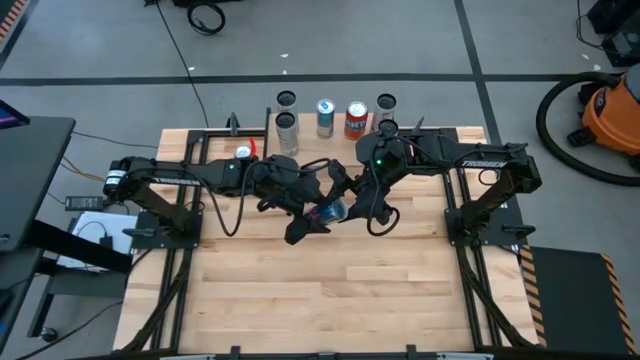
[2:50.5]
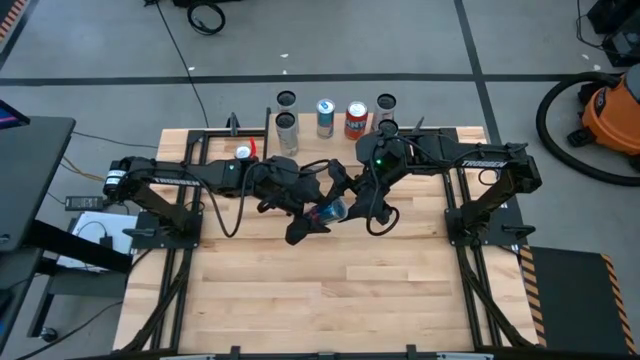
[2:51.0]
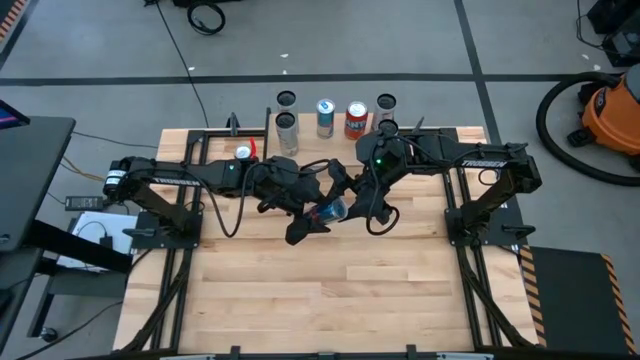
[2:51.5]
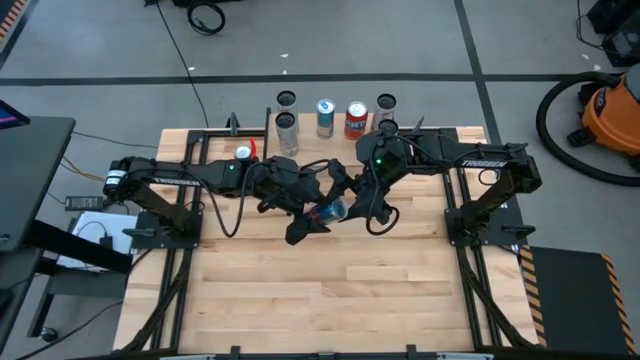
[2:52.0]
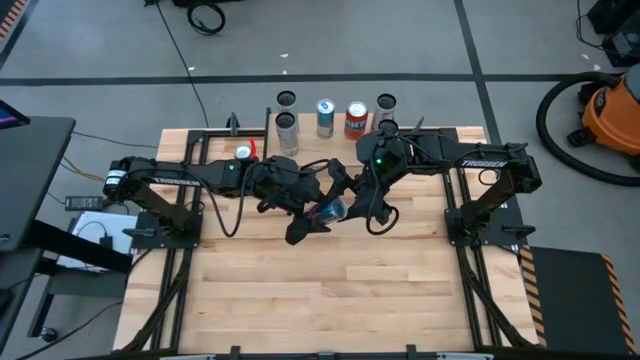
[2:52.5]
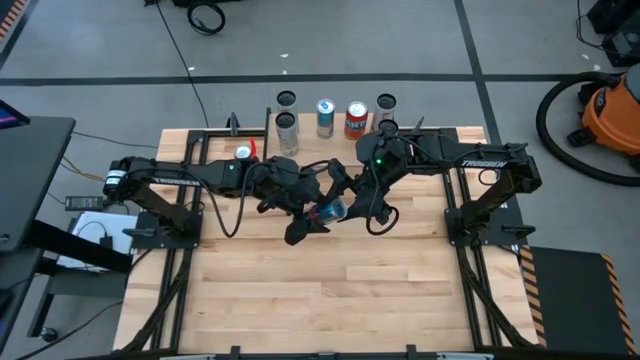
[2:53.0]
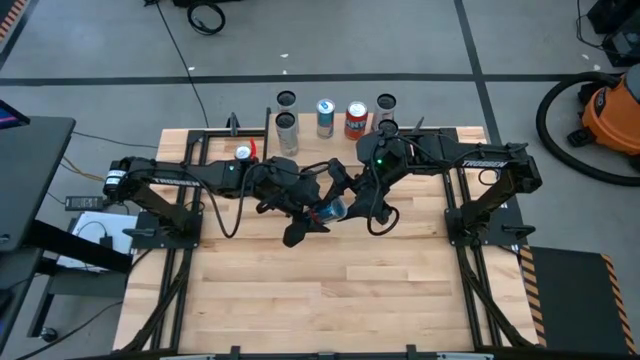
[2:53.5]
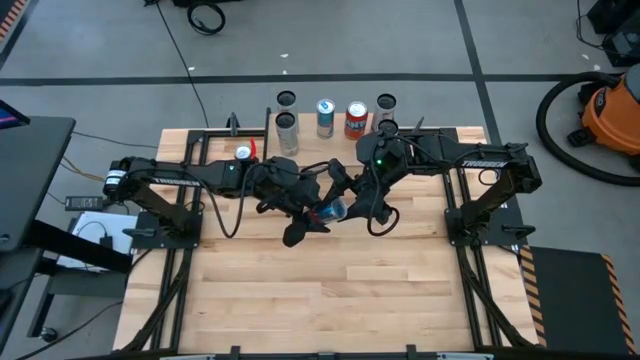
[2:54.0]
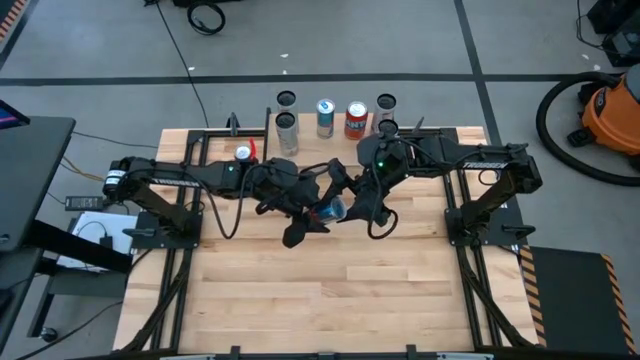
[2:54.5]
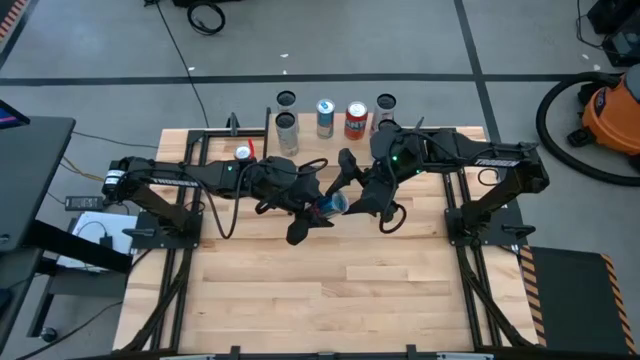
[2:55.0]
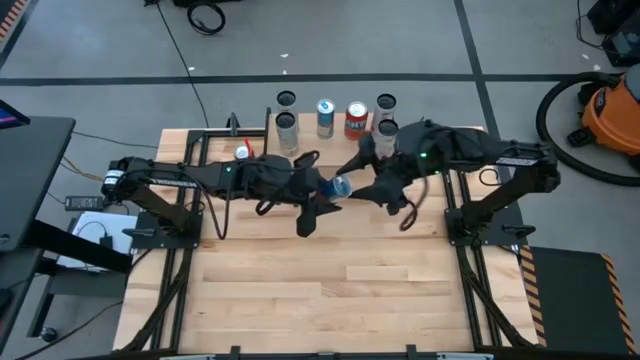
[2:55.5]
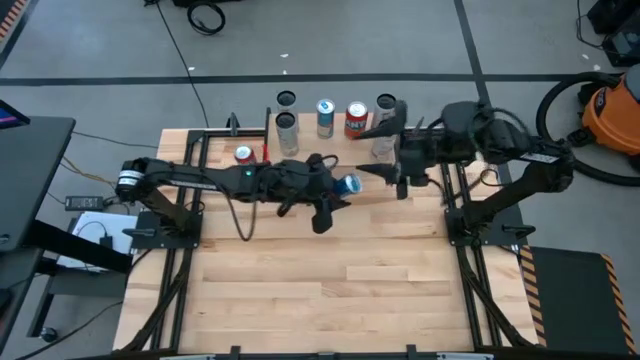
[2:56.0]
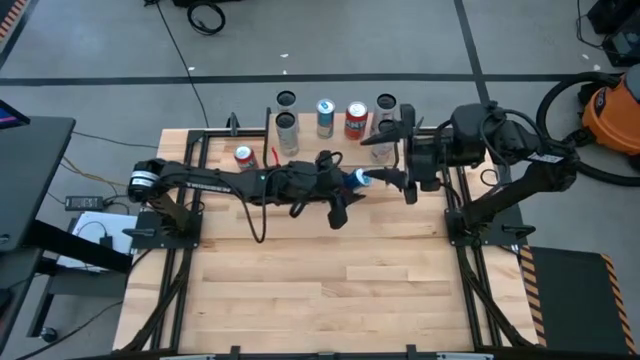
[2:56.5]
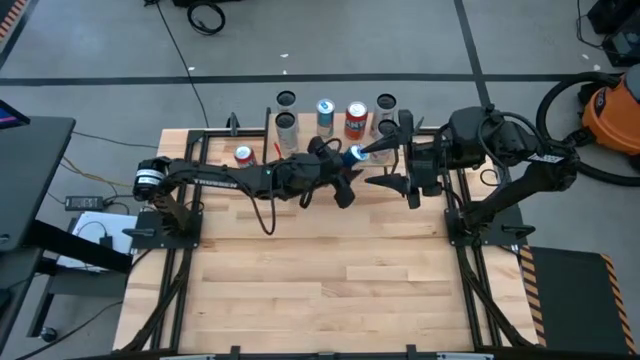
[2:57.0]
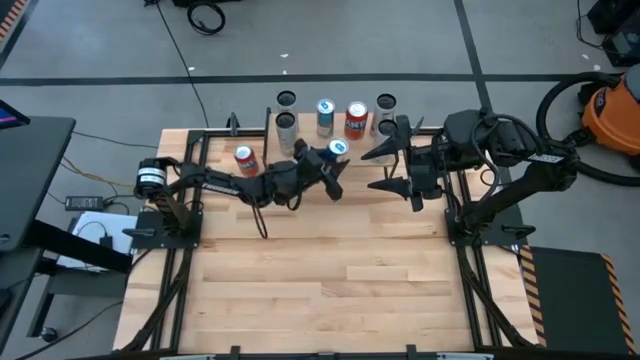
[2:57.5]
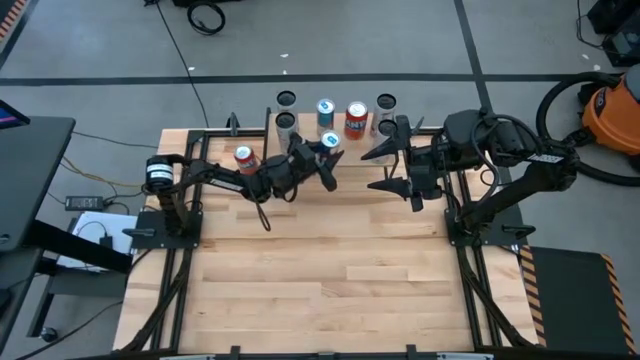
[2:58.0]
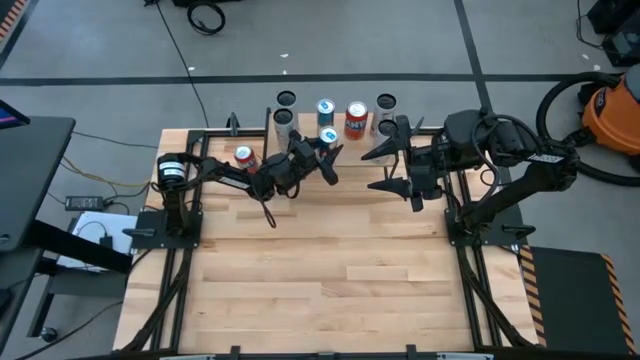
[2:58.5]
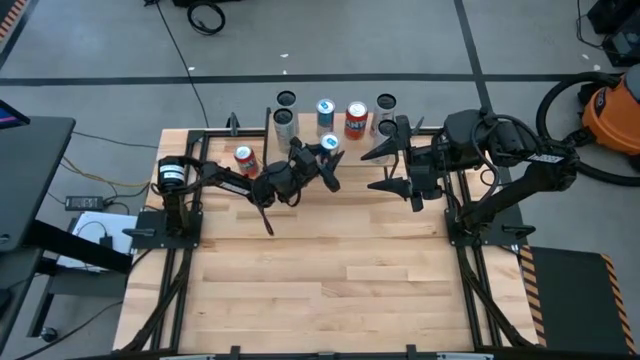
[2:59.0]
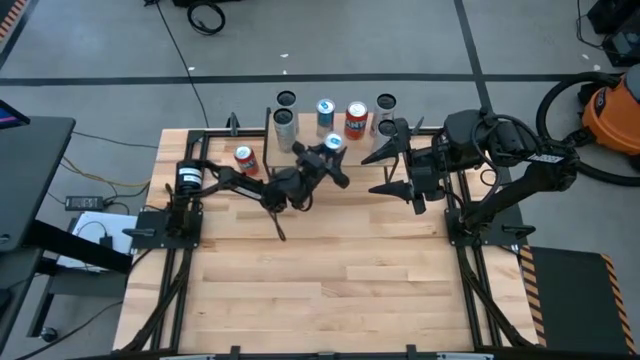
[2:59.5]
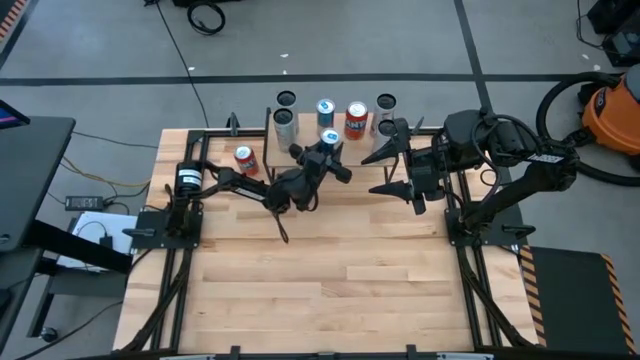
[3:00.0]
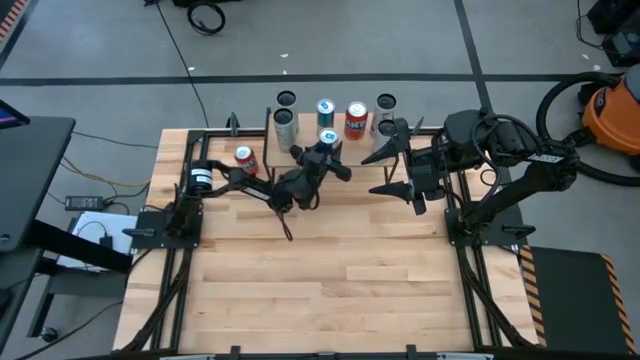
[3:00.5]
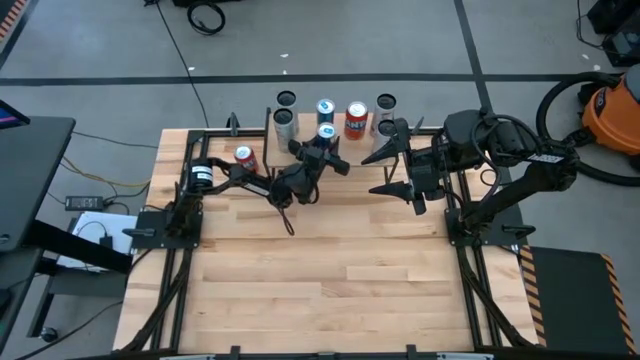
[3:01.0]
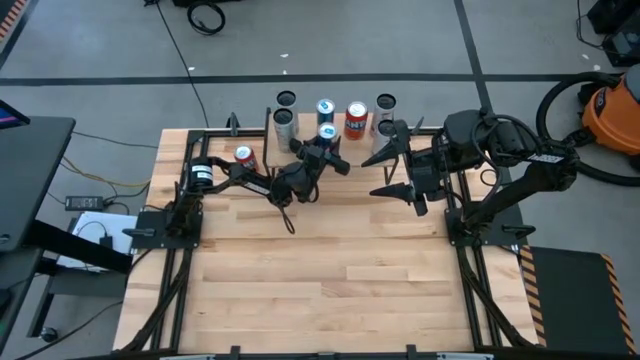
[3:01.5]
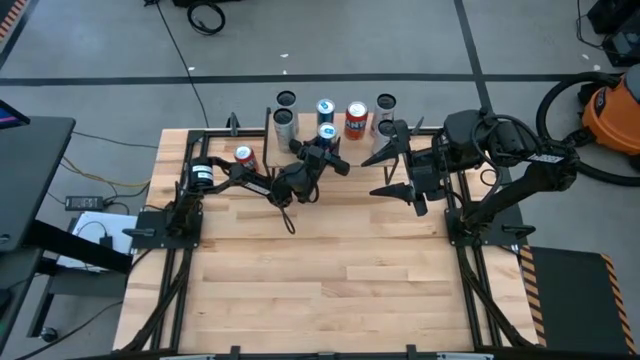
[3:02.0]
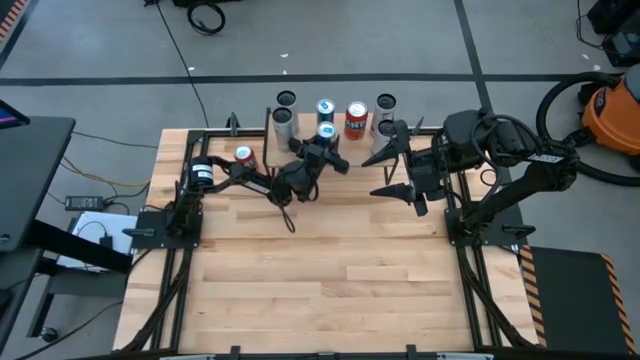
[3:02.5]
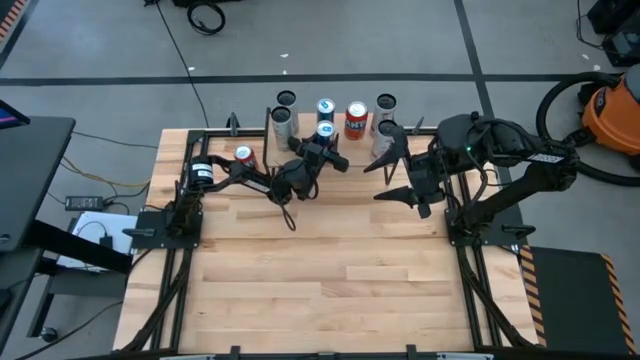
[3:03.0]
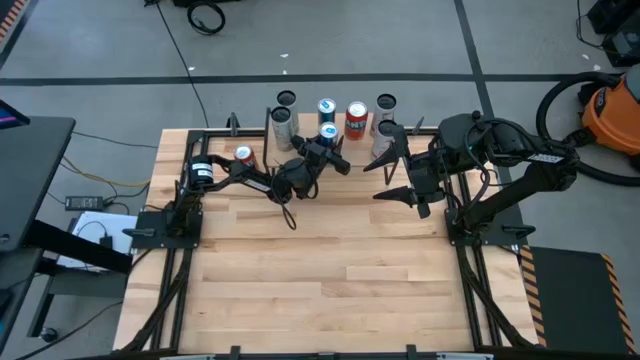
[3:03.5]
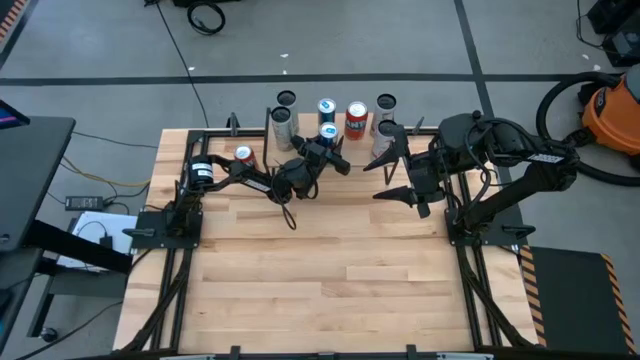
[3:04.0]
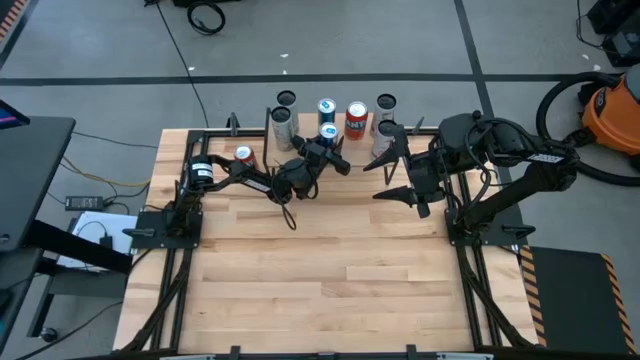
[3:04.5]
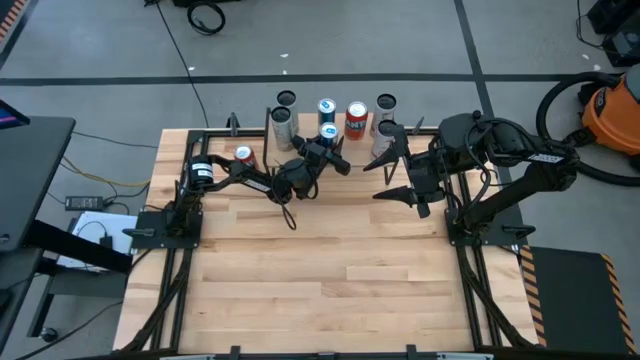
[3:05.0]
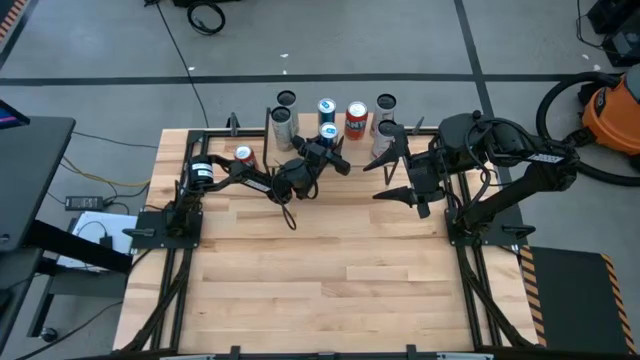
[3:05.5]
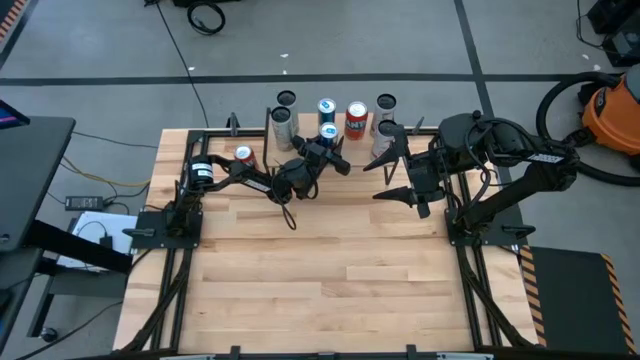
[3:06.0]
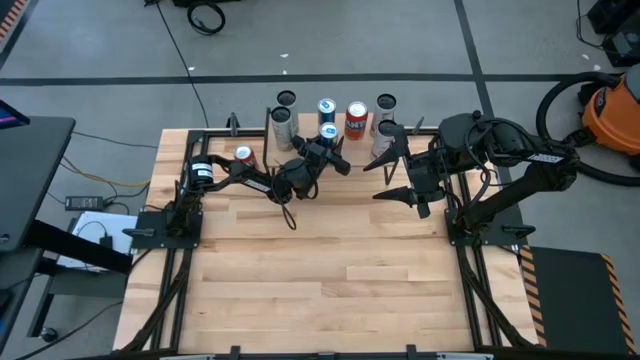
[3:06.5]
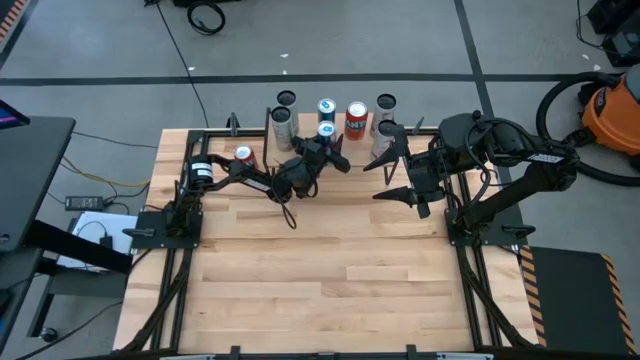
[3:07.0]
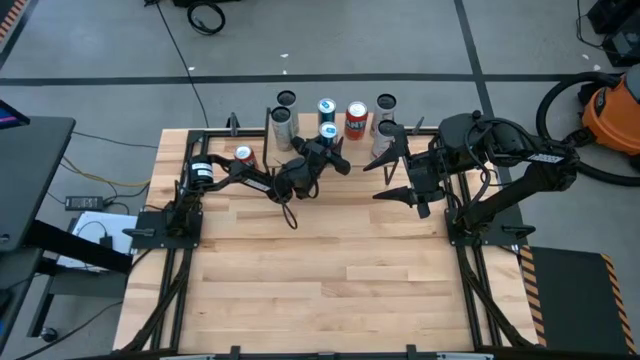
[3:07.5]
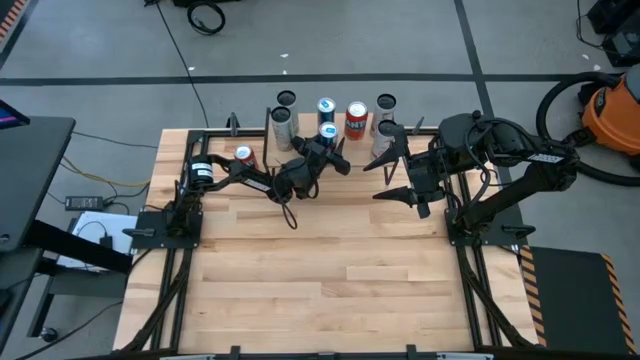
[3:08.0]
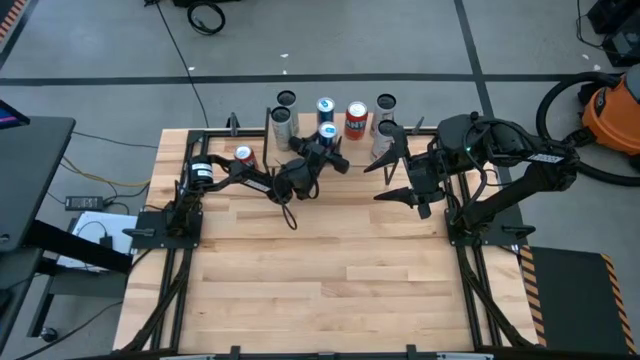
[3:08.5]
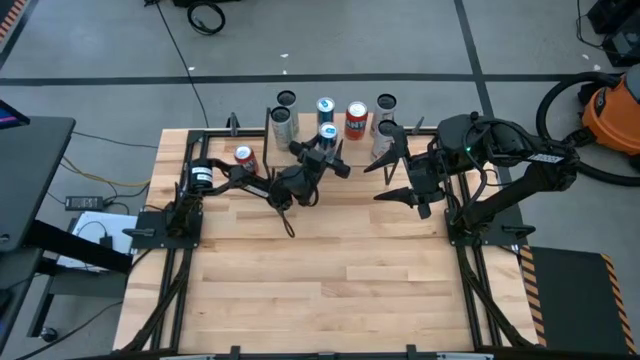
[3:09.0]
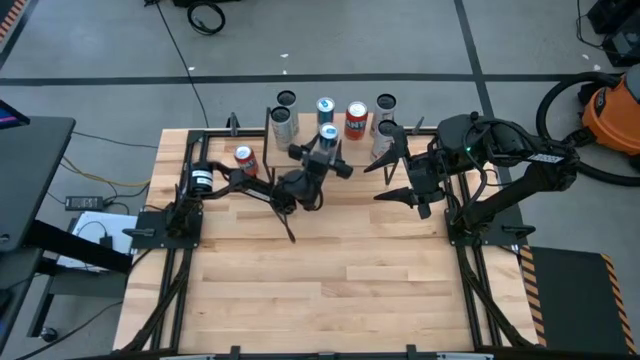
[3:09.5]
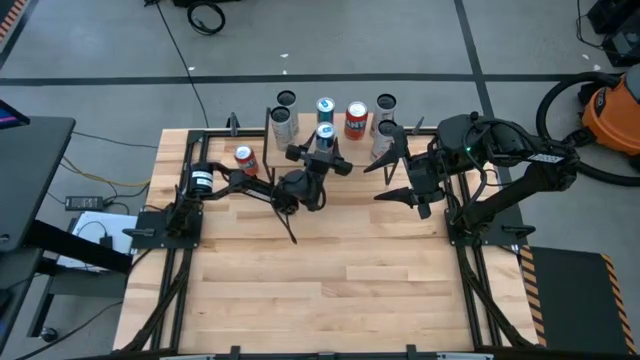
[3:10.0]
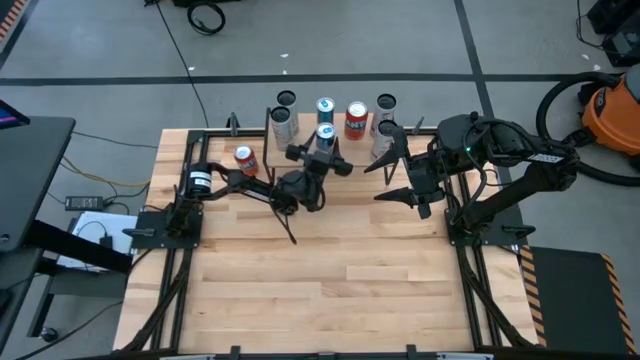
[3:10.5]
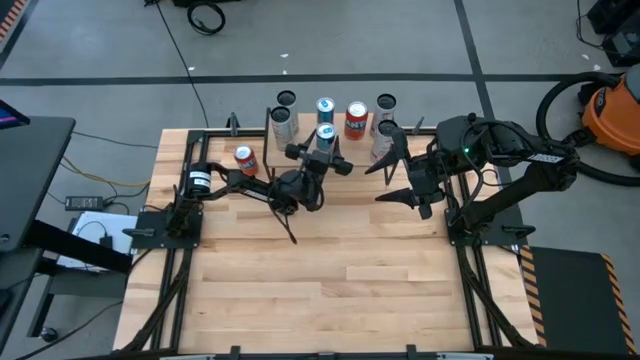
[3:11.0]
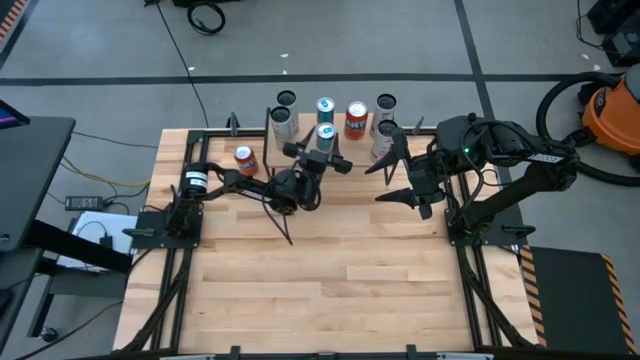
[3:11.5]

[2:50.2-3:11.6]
Task: Place canned beverage on shelf
Put the blue soda can on the shelf aligned with the other blue soda can

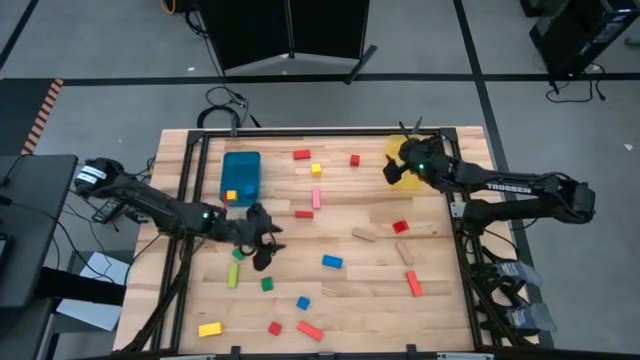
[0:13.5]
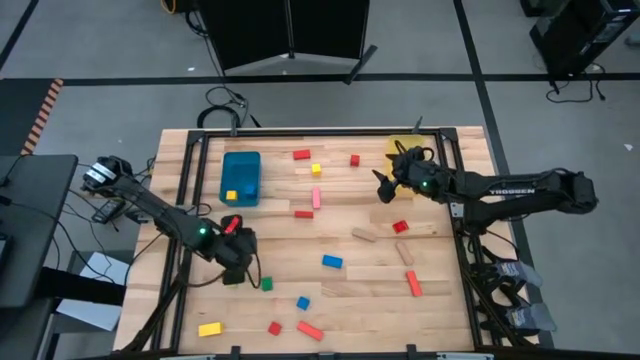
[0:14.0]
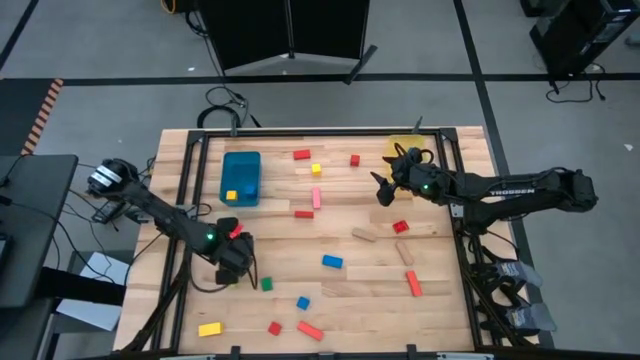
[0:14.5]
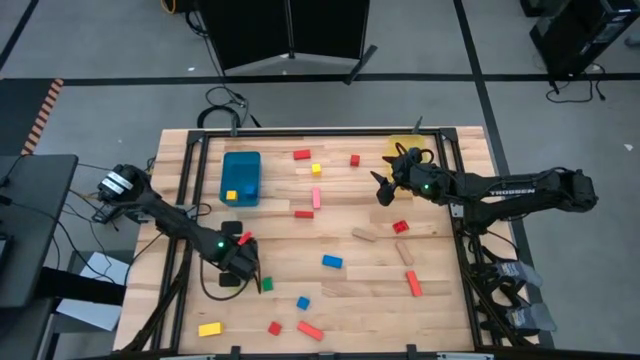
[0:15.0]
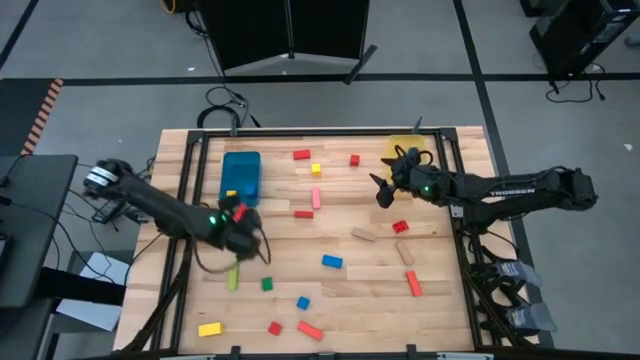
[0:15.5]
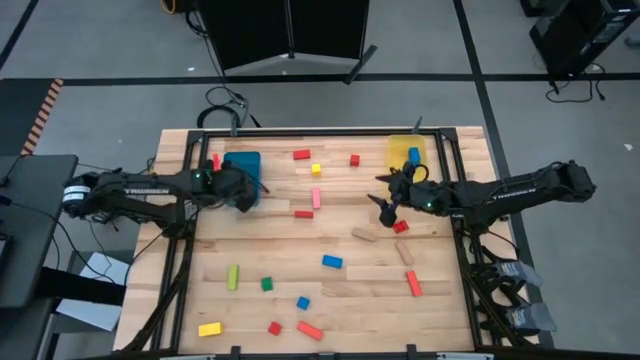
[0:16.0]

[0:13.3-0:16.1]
Task: Sort blocks by size
Put the small green block into the blue bin
